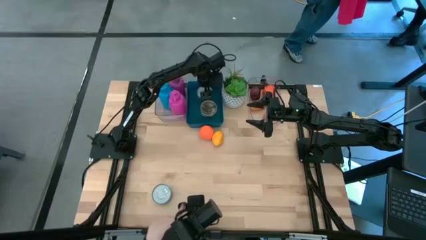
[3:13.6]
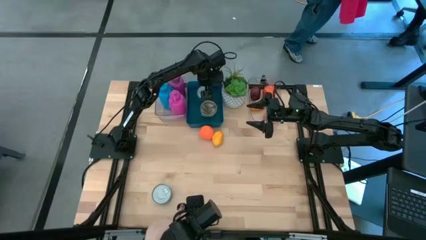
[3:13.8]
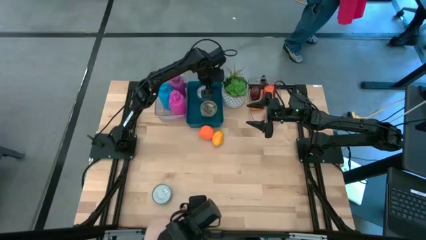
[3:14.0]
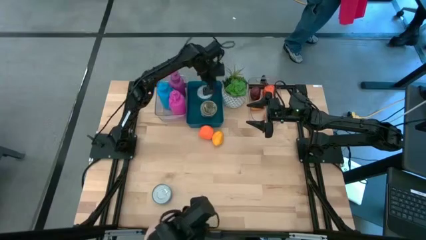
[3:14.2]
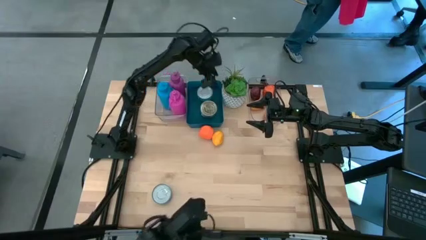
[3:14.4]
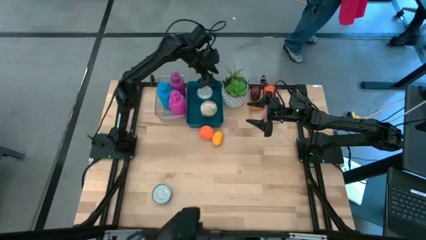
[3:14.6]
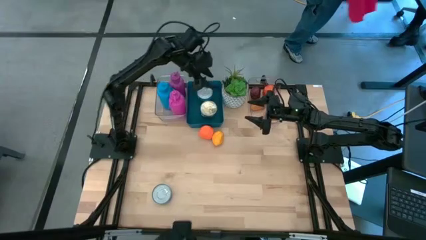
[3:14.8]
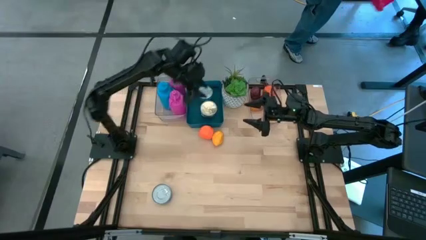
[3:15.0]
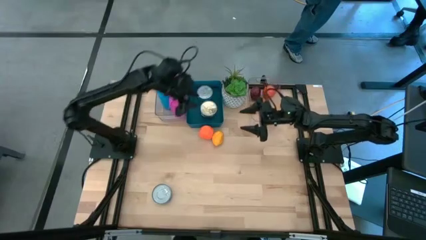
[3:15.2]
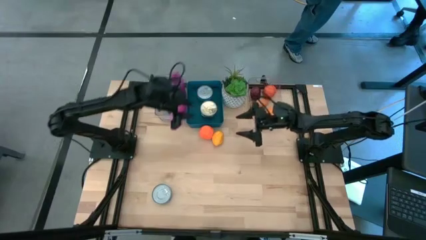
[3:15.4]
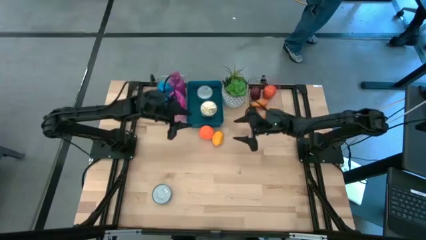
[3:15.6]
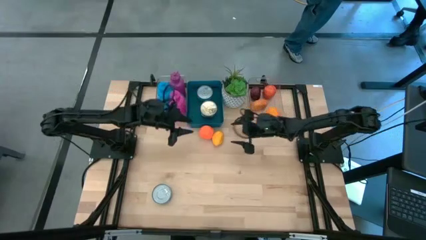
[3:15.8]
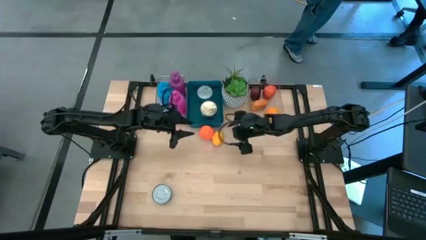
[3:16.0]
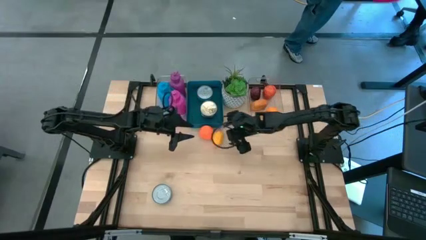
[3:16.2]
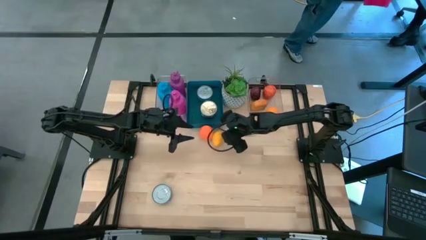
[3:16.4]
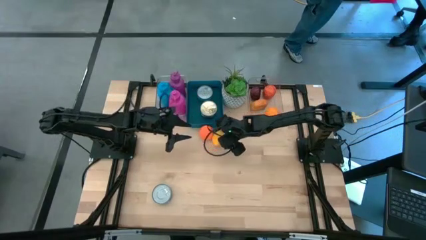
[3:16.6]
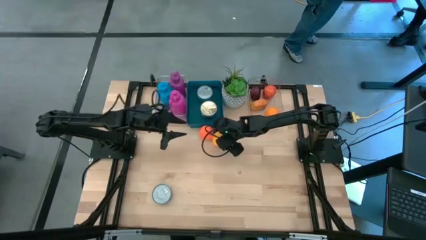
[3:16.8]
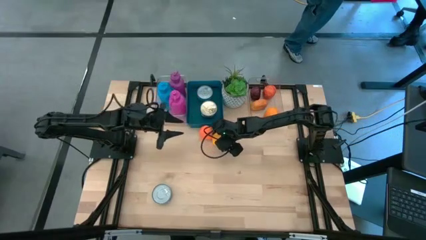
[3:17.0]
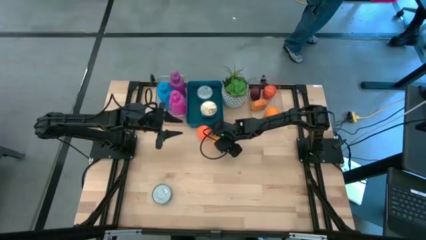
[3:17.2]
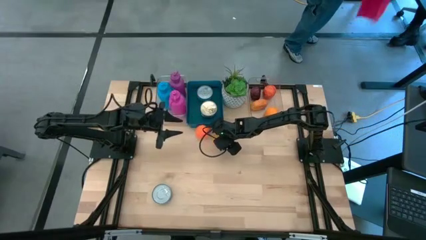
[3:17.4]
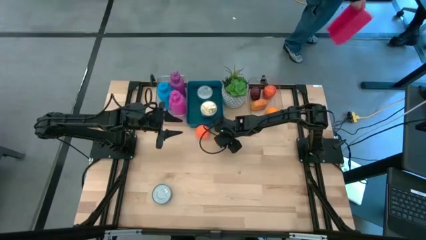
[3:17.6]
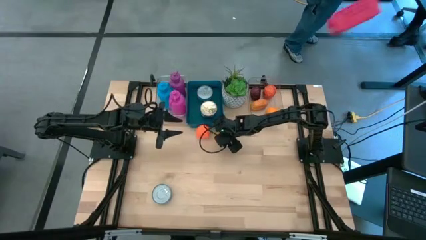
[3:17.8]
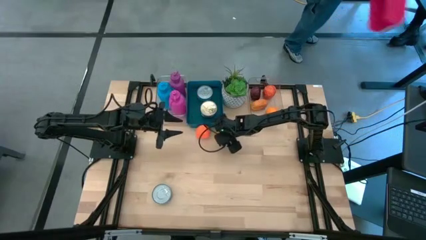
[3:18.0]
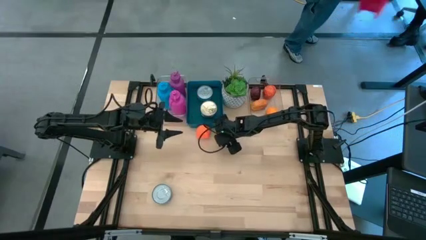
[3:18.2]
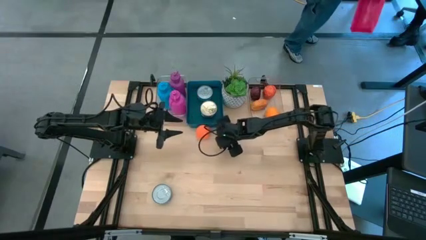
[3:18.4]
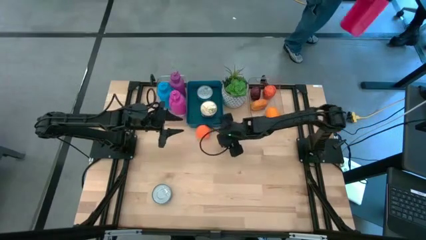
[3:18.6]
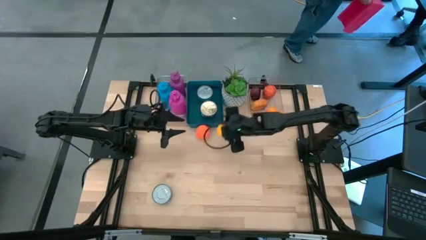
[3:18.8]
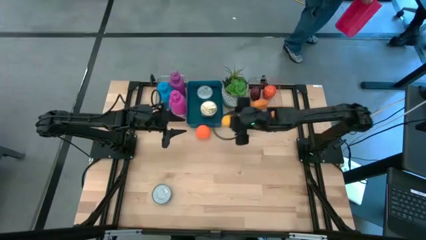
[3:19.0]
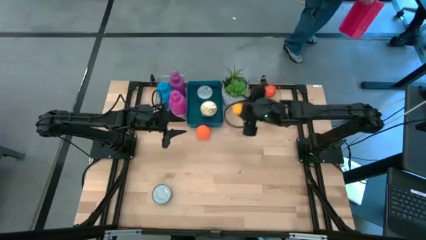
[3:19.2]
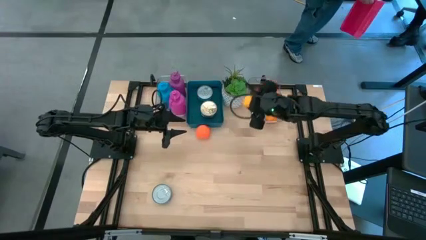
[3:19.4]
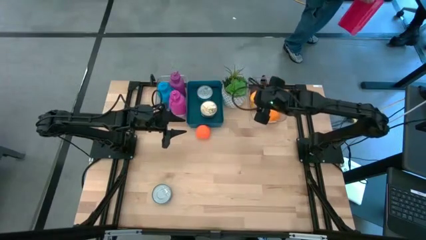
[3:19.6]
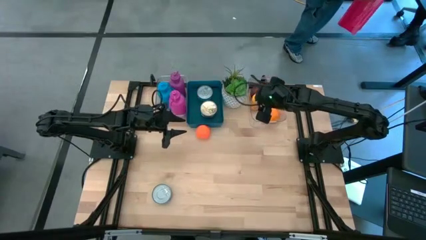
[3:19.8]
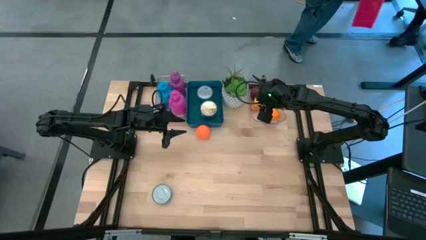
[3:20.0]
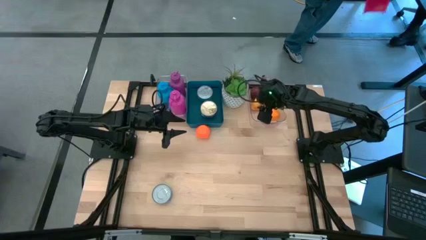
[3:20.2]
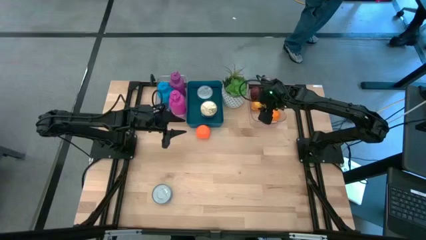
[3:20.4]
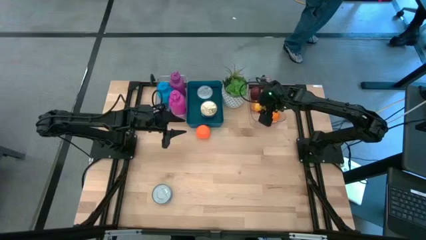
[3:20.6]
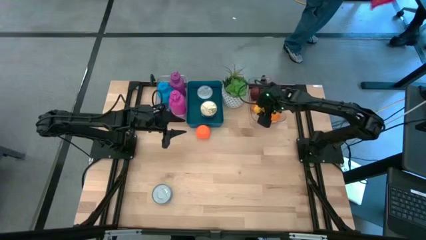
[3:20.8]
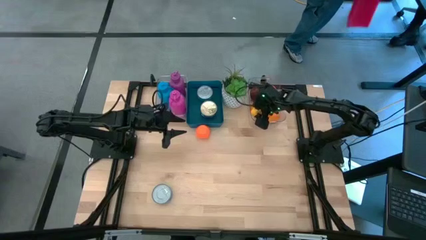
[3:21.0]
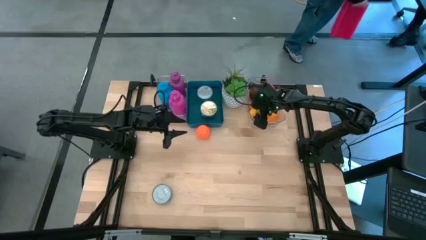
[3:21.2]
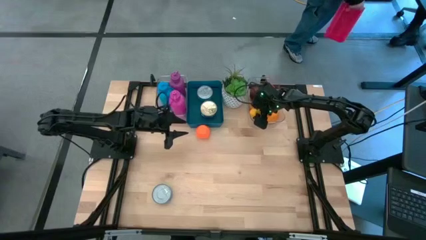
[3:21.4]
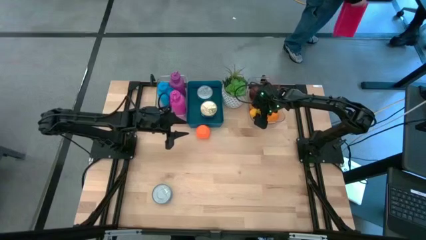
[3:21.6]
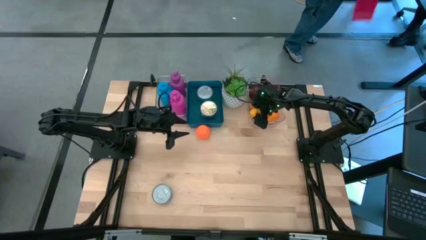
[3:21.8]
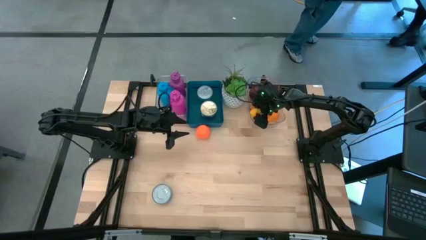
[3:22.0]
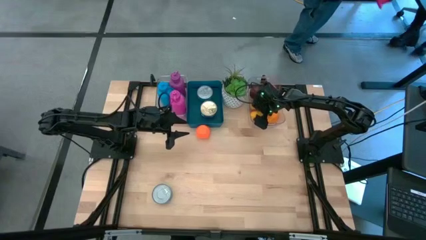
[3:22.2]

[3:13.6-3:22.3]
Task: Pick & Place Food Item
Put the lemon into the right transparent bin

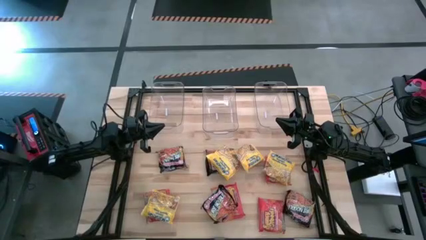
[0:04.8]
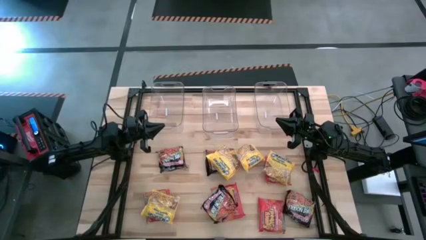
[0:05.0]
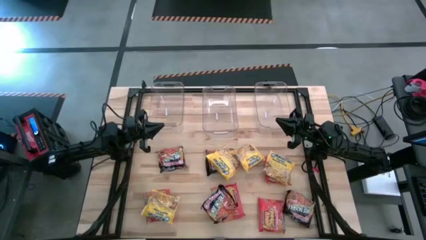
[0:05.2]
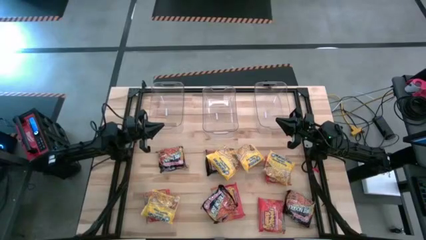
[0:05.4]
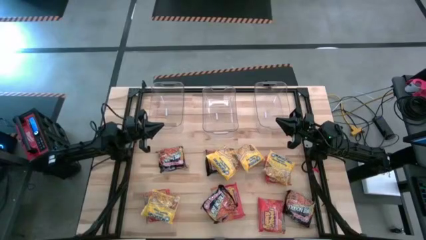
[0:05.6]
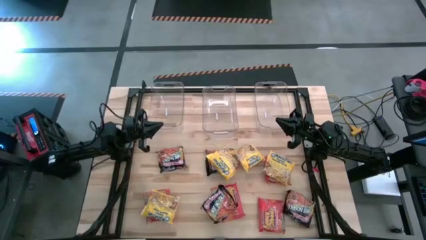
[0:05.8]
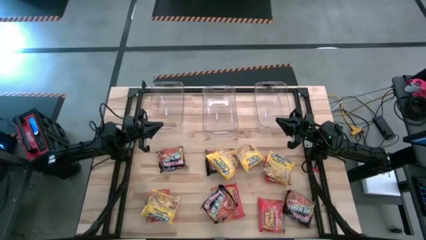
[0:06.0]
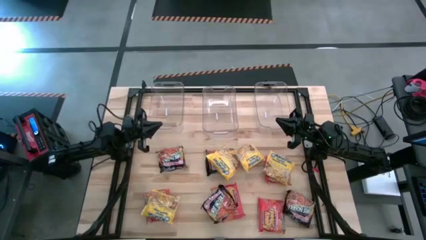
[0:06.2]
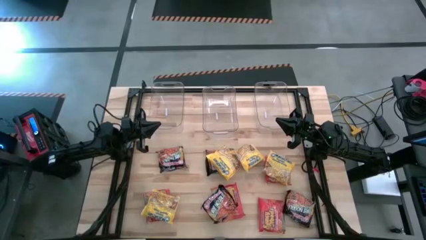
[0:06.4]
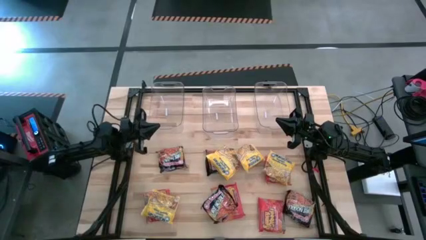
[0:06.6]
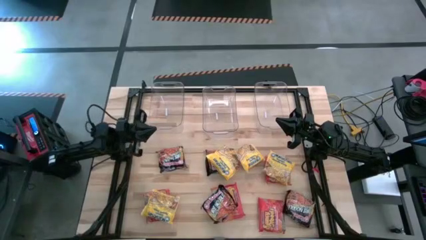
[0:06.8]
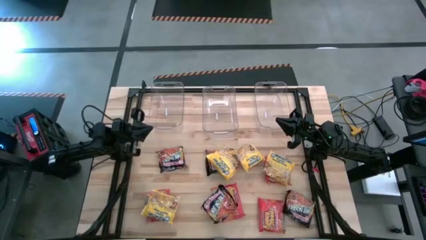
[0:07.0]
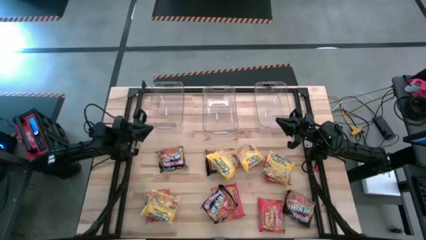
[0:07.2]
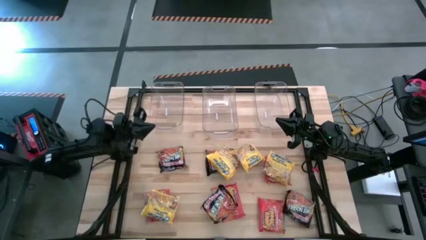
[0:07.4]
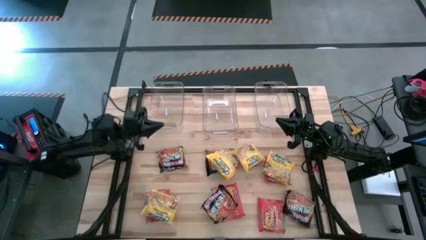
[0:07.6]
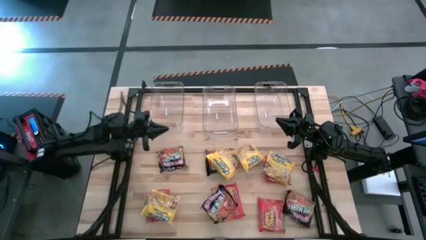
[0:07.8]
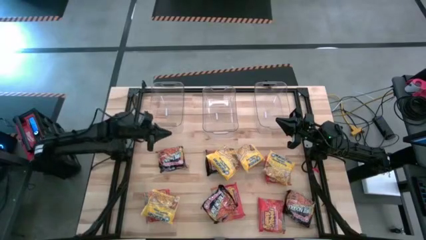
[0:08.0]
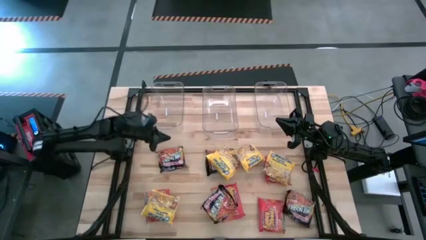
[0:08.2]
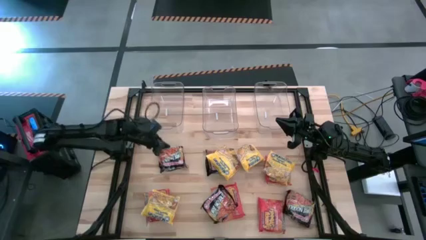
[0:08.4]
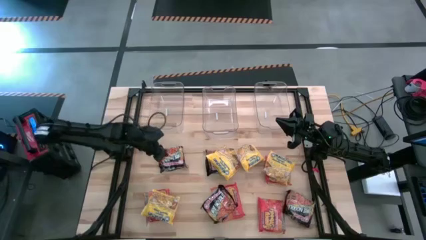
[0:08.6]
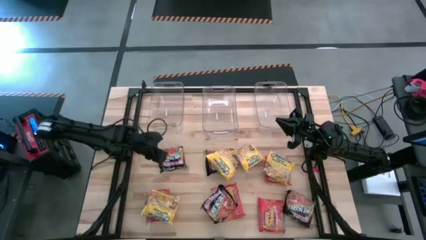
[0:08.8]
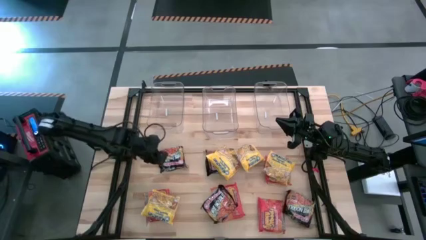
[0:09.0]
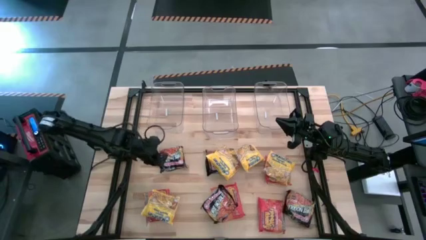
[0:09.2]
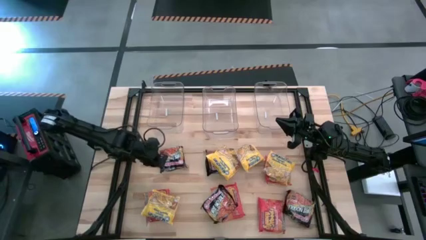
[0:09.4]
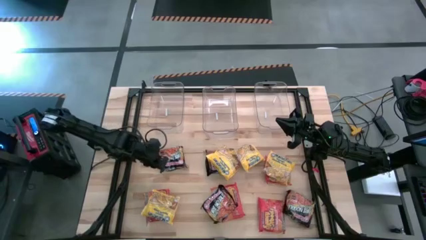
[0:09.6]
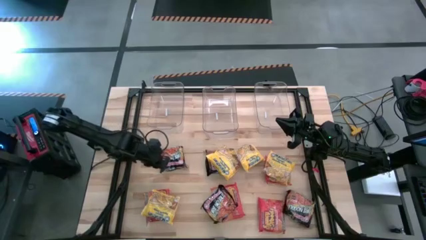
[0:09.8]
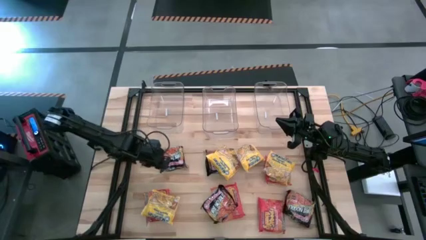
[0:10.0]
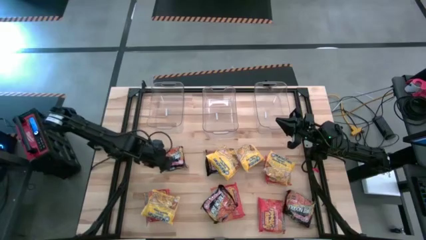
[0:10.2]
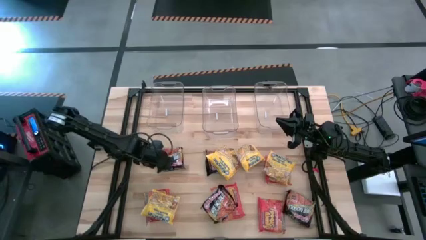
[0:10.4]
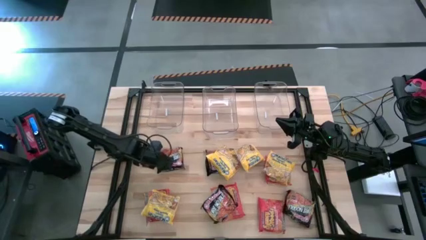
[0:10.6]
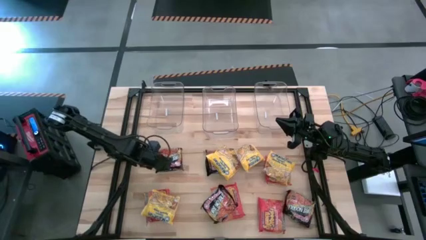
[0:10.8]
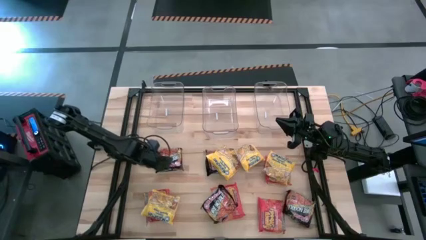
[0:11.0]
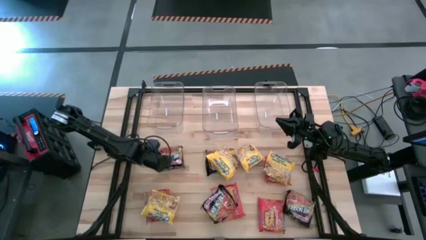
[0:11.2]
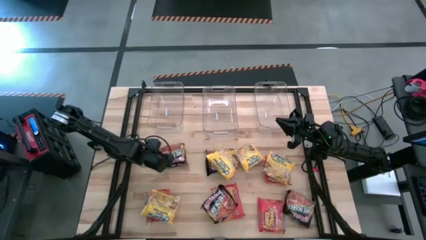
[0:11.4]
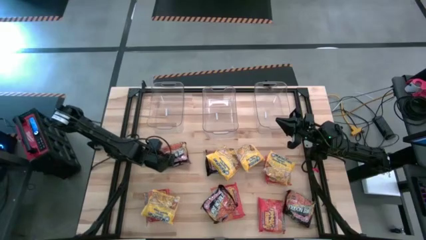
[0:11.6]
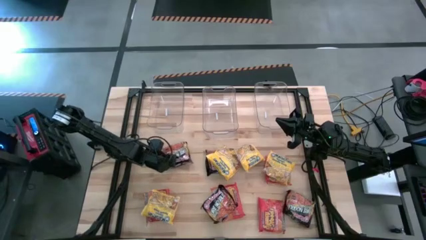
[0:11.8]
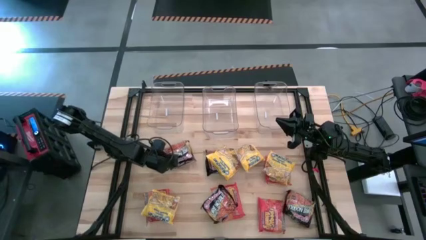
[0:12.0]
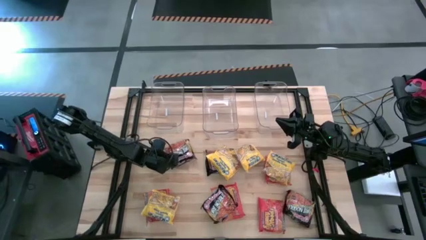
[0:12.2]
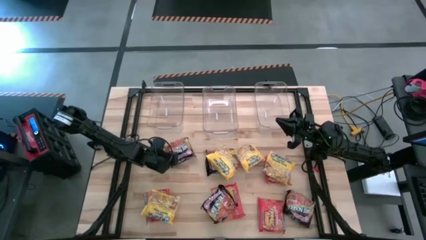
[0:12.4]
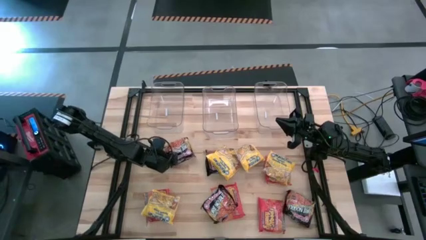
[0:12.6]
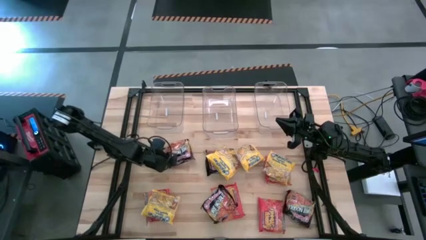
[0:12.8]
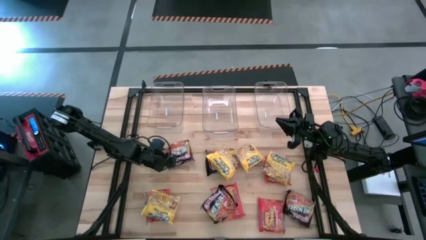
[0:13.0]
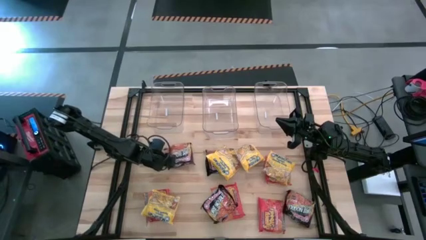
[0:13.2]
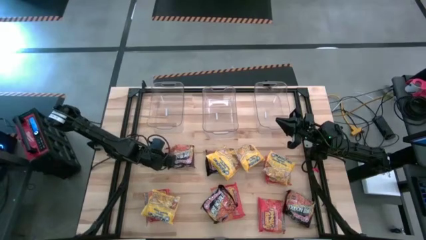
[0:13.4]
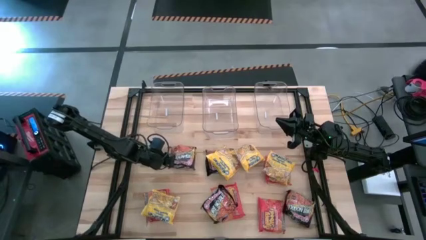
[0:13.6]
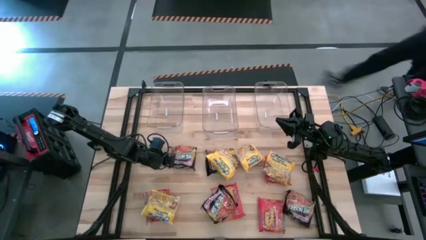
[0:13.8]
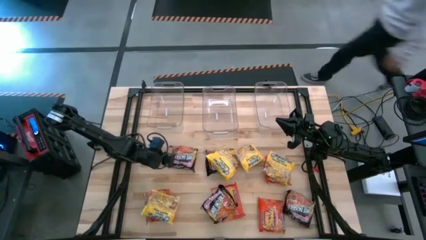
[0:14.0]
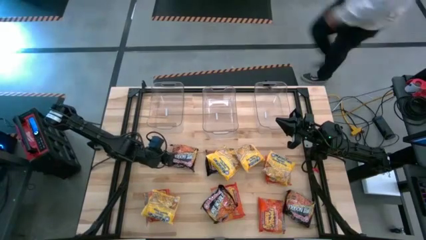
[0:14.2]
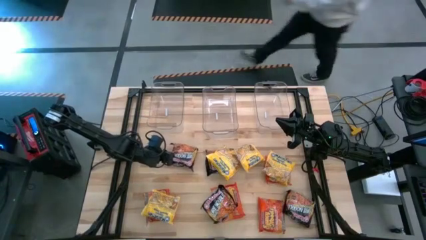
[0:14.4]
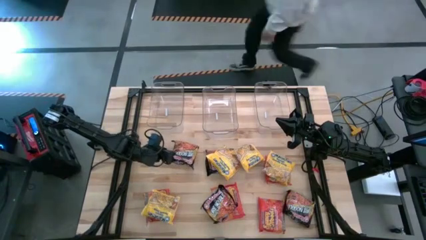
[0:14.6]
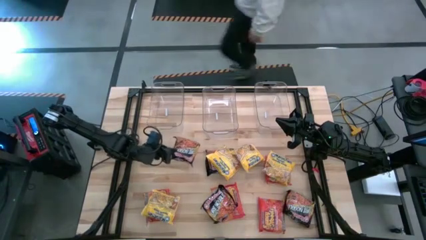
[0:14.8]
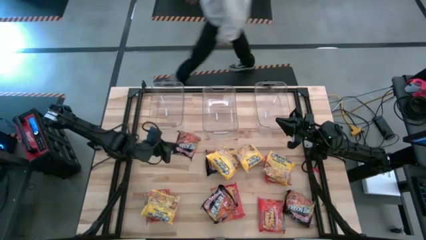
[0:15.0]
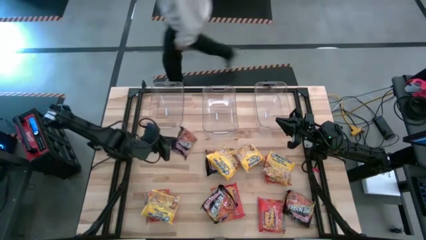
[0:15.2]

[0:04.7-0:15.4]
Task: Sort Maruchan noodles
Put the black noodle pack into the middle transparent bin
